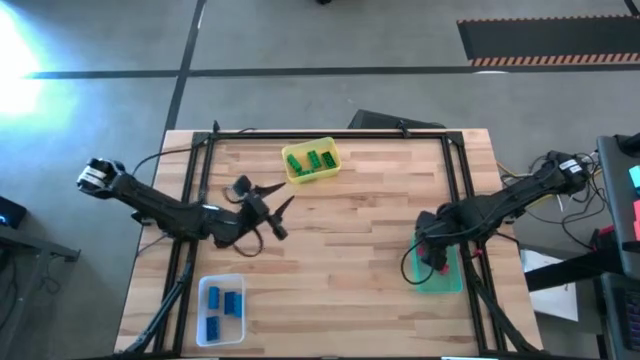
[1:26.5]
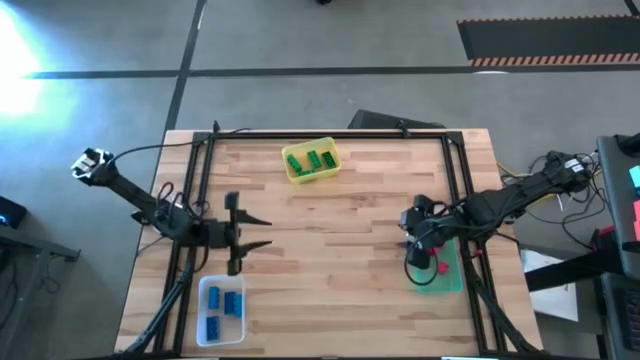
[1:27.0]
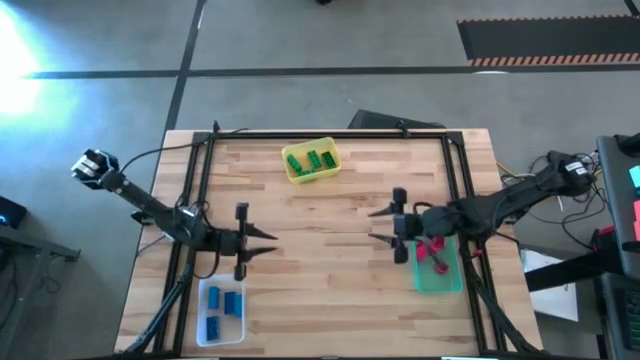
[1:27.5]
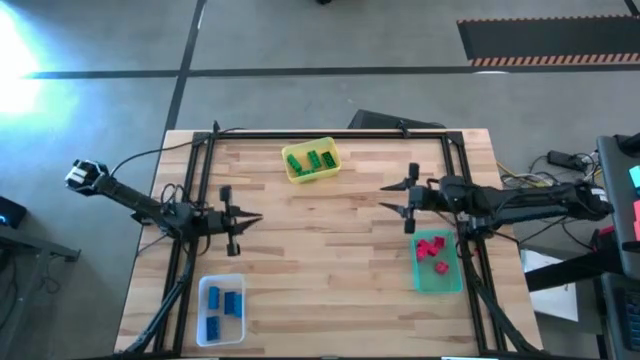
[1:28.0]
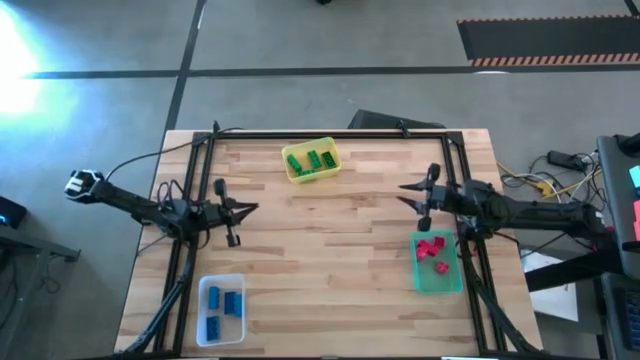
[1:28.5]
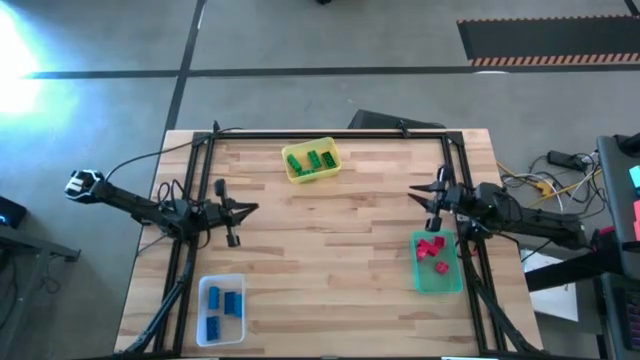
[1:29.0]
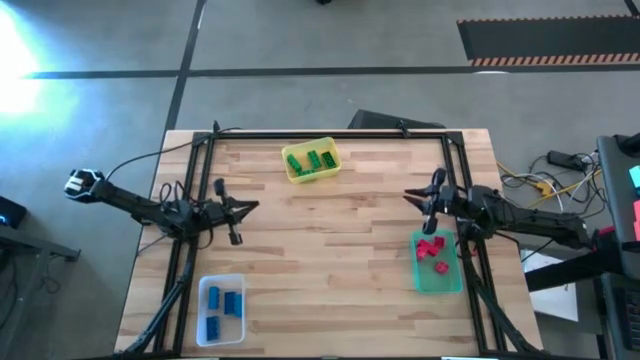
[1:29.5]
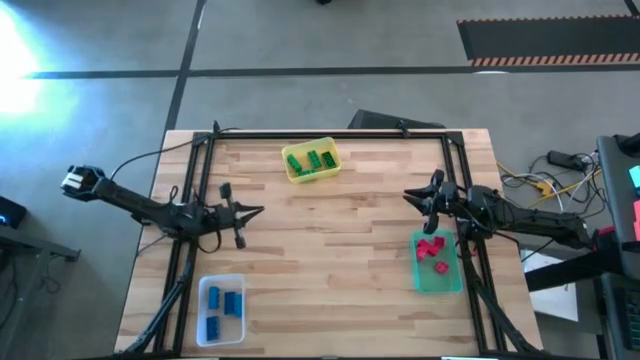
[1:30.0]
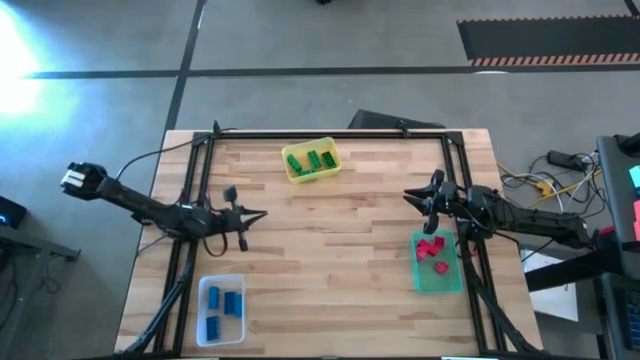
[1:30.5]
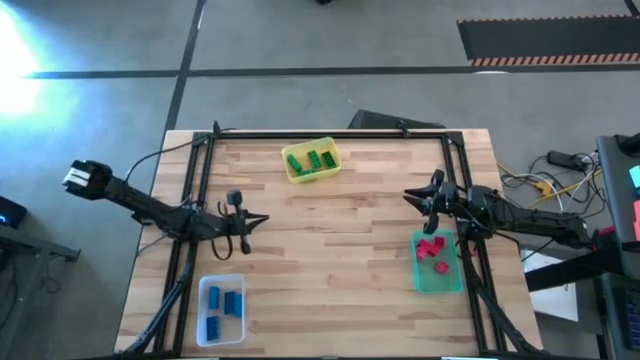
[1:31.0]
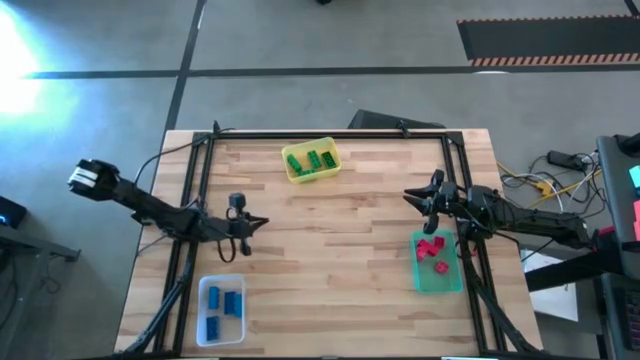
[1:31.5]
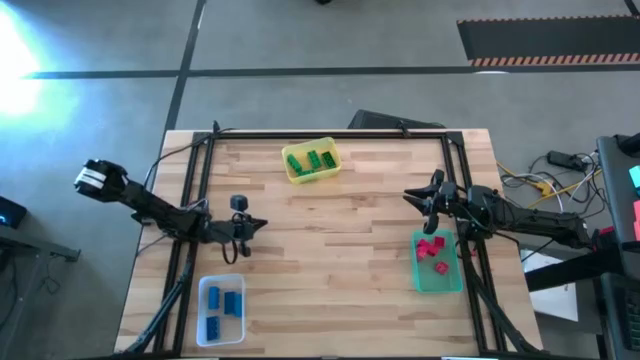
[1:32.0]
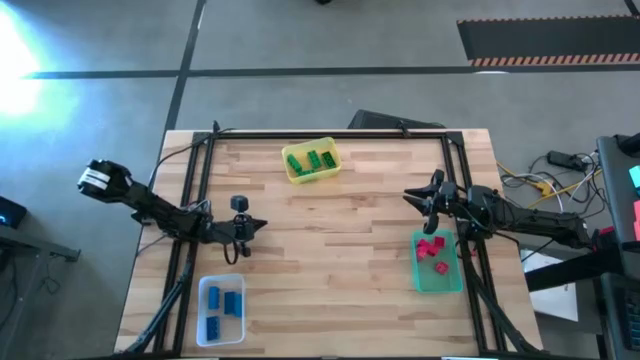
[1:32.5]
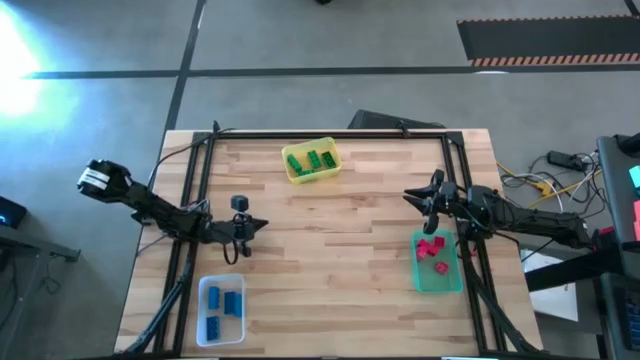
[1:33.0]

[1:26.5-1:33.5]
Task: Sort & place blocks by color
Return to Home Position

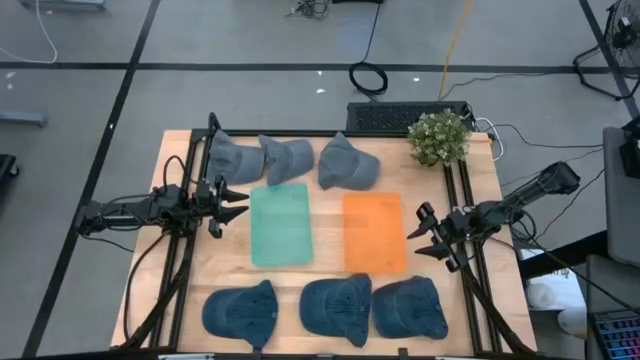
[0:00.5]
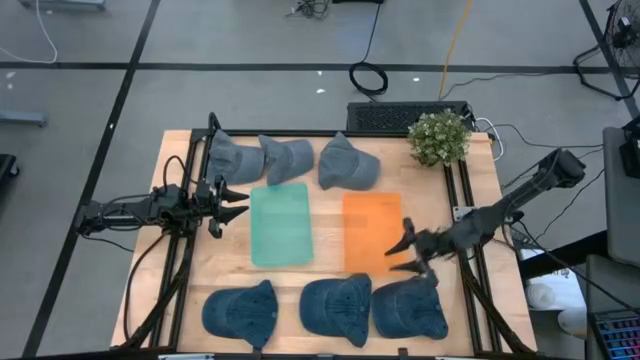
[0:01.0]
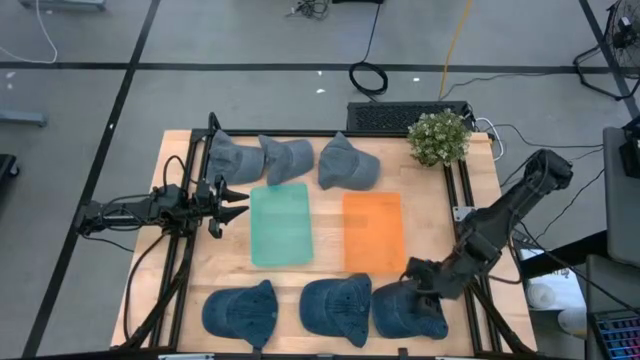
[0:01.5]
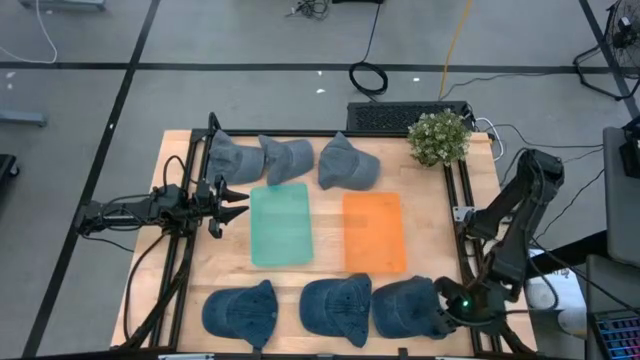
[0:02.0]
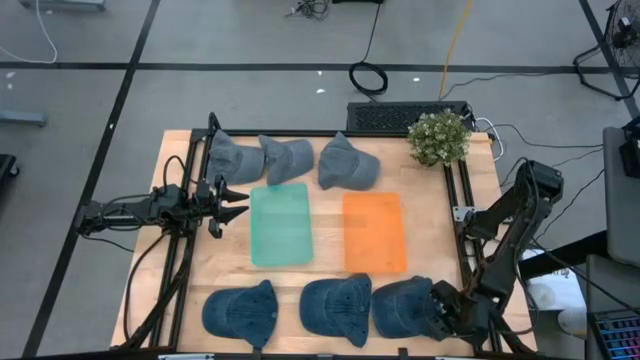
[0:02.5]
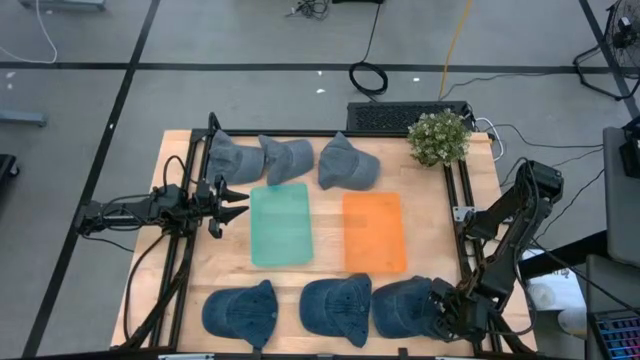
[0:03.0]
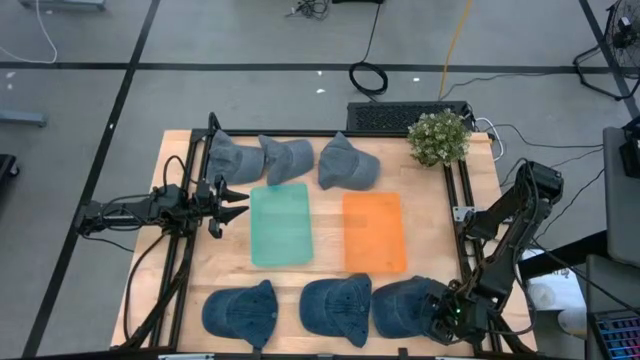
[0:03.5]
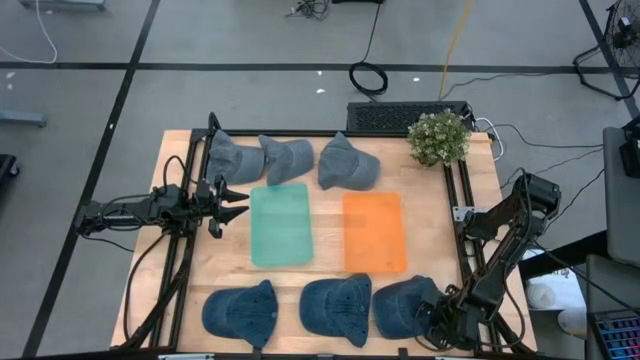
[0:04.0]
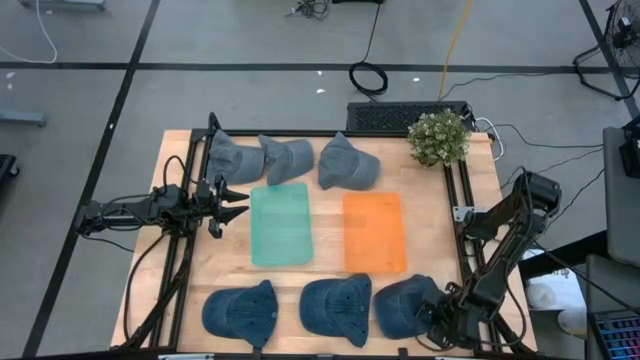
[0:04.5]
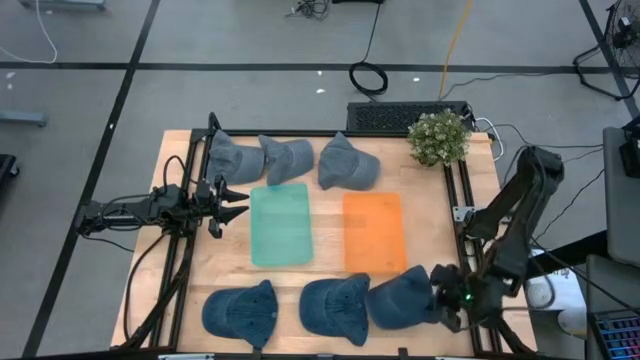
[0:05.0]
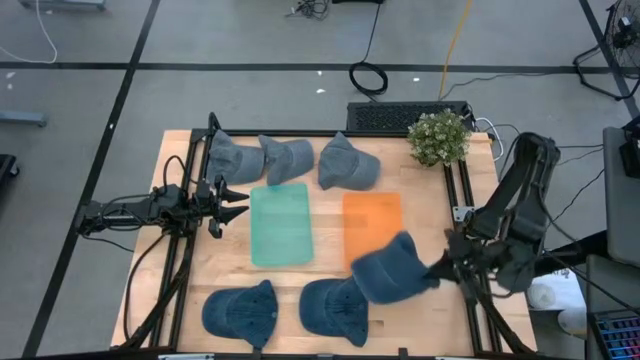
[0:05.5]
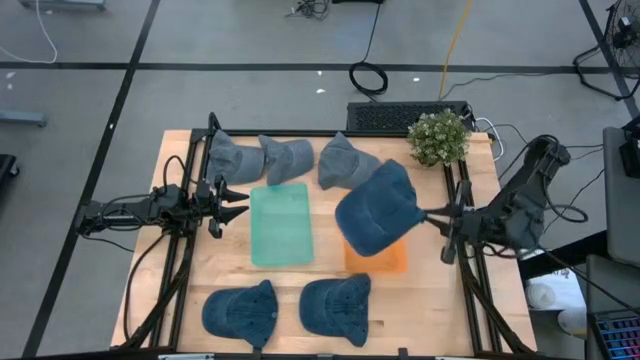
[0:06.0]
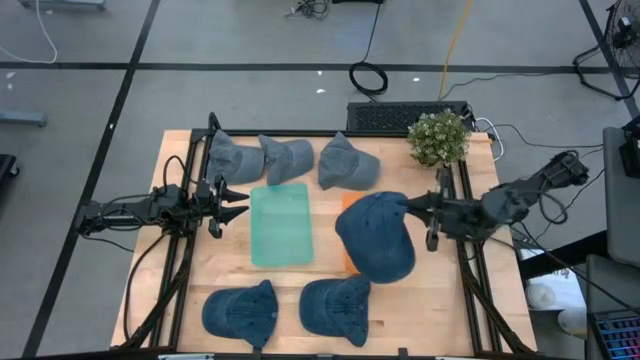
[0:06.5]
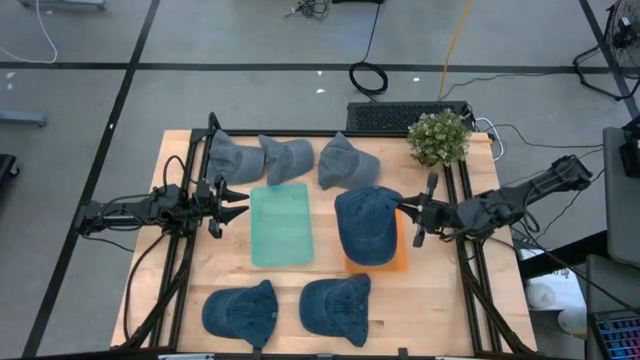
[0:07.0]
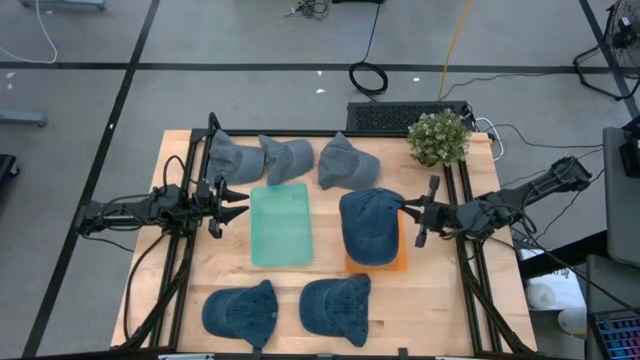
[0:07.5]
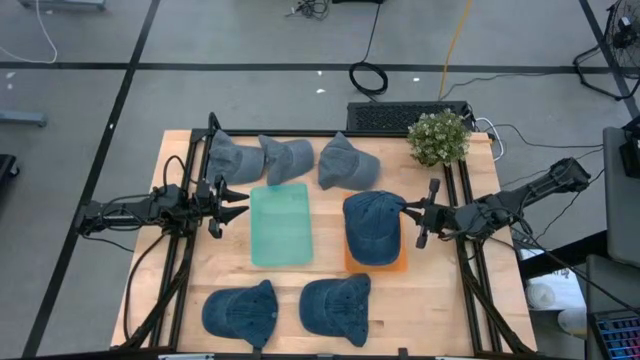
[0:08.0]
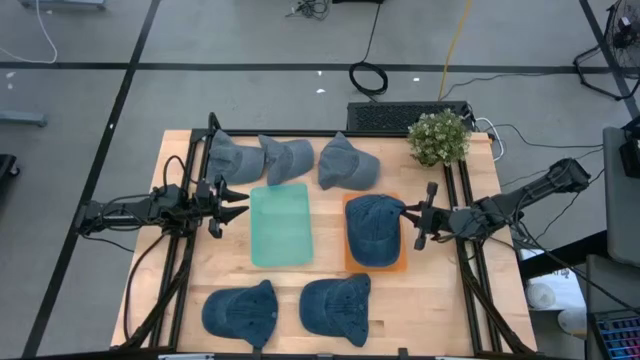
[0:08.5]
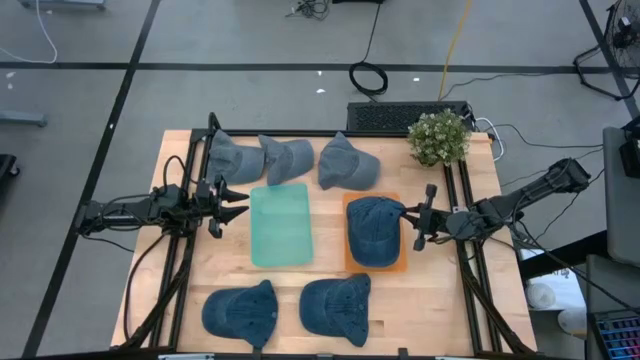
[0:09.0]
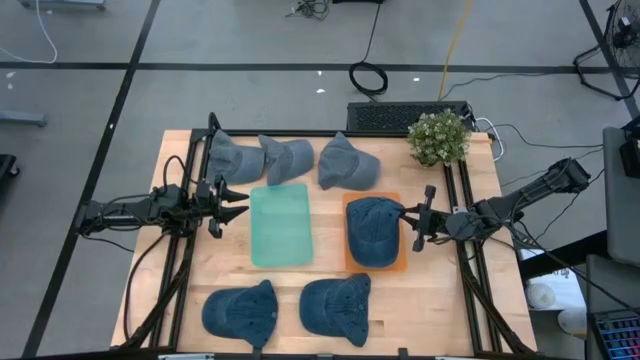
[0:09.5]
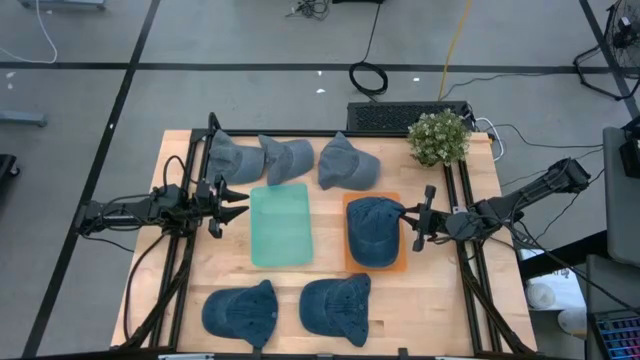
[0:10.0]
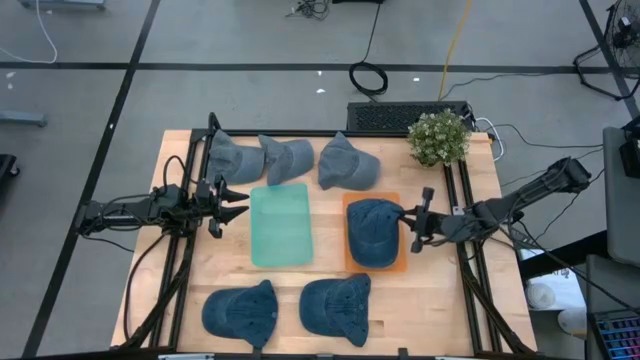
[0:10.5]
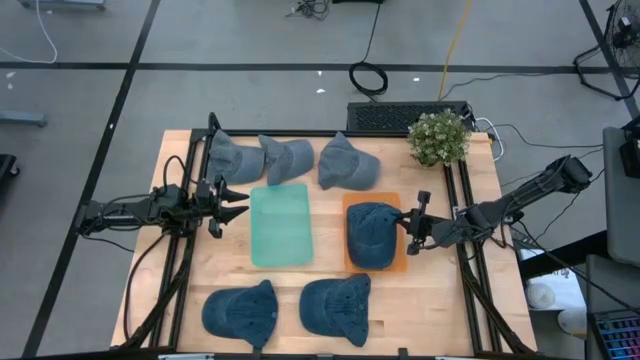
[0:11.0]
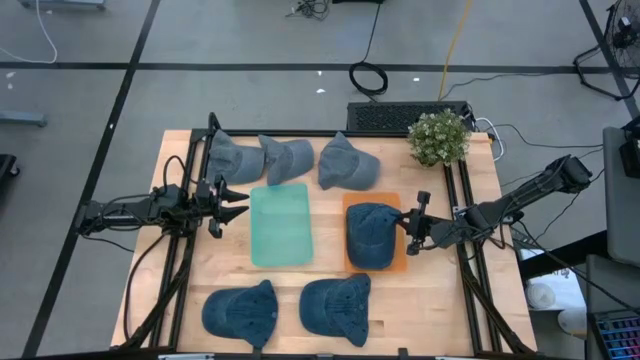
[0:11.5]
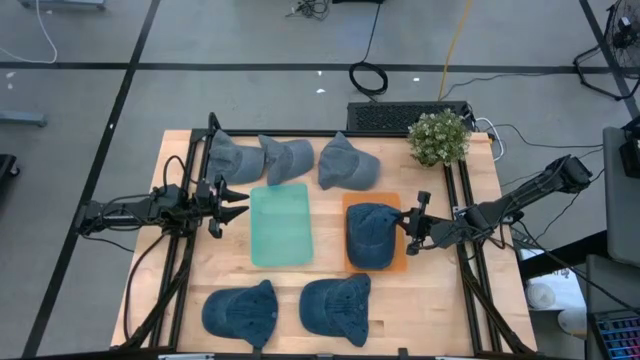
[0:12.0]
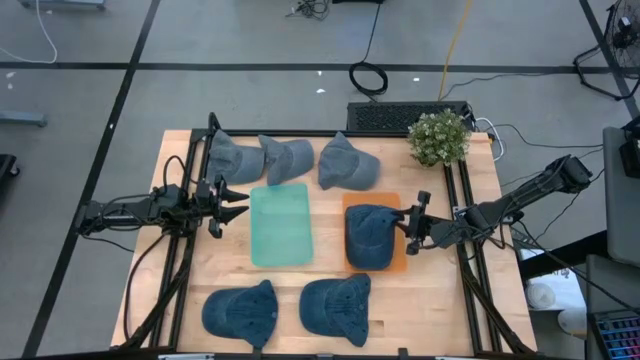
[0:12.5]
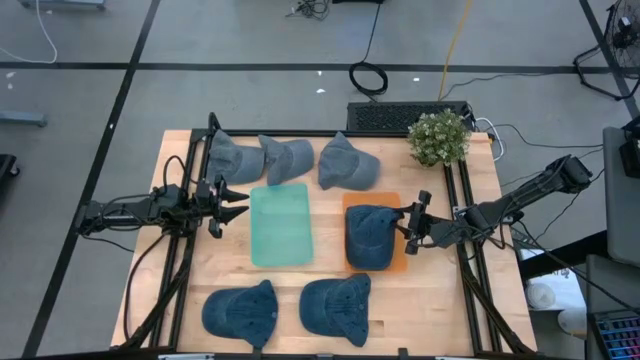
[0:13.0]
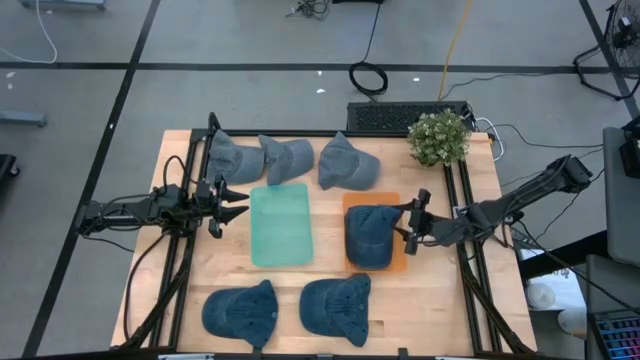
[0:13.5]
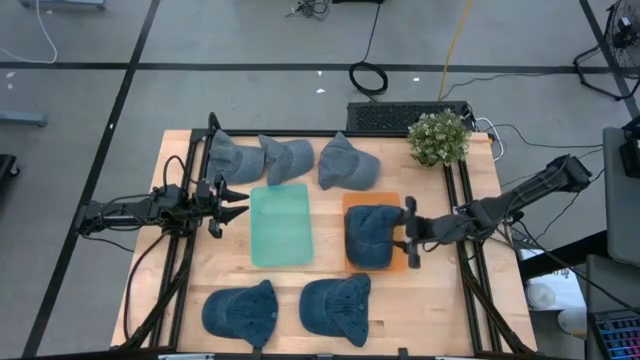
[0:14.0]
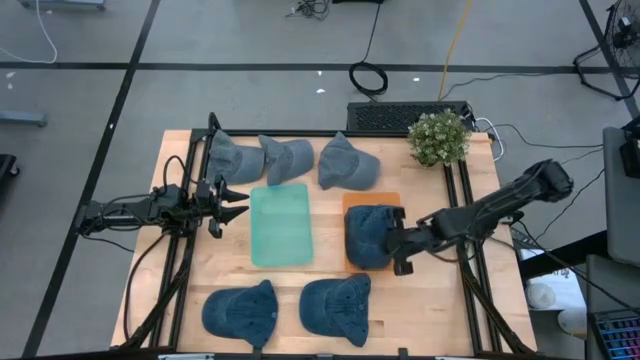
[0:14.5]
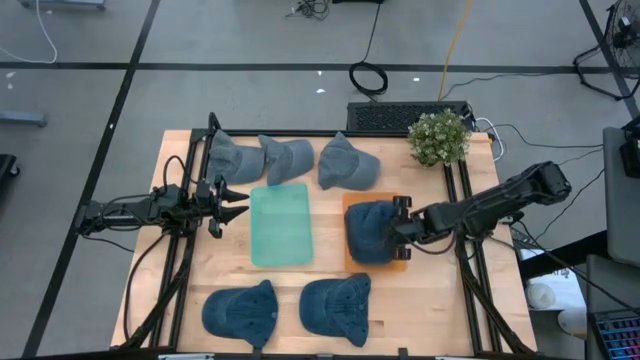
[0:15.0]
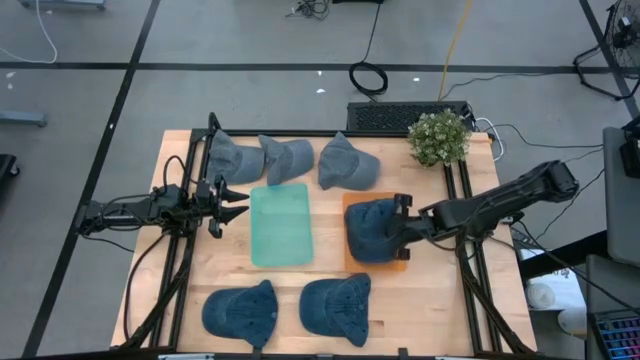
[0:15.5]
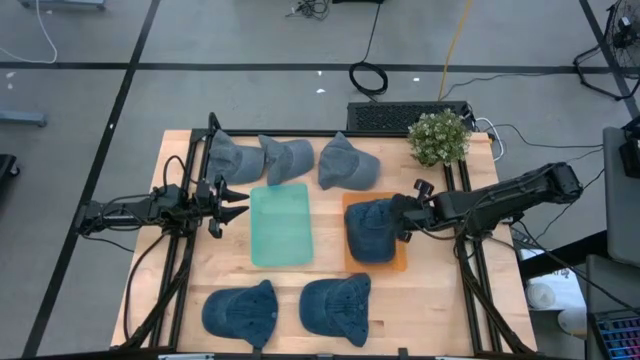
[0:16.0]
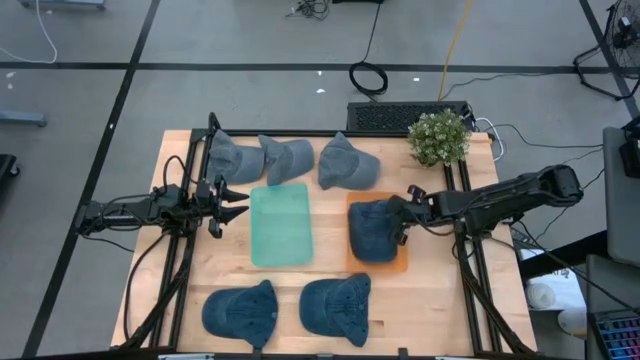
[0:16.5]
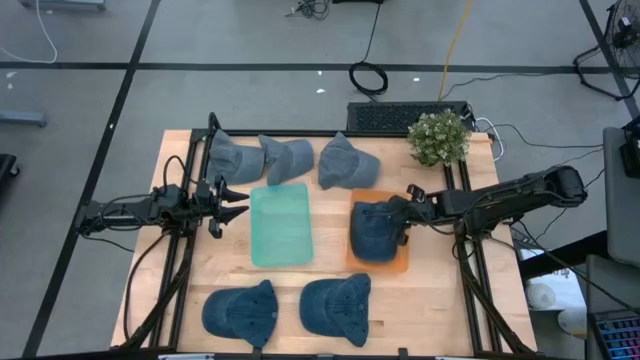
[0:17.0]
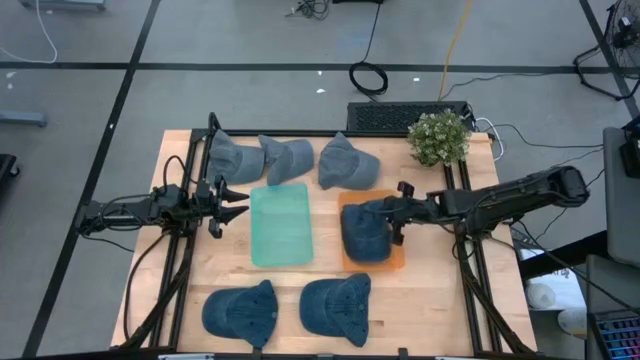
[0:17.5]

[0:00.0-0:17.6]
Task: Pick & Place hat
Put the right blue cap into the orange bin
